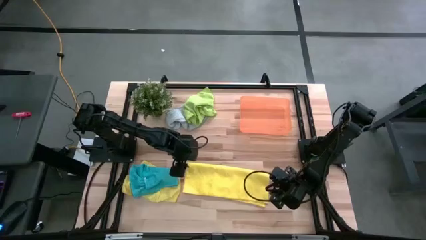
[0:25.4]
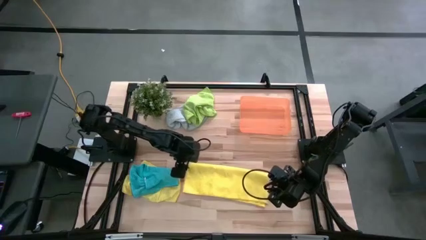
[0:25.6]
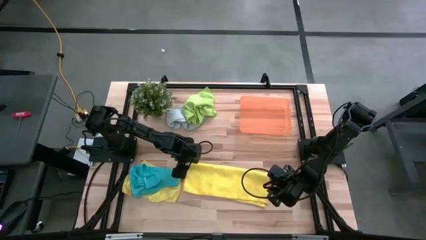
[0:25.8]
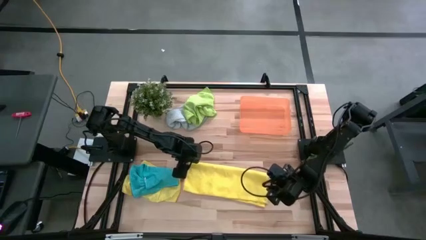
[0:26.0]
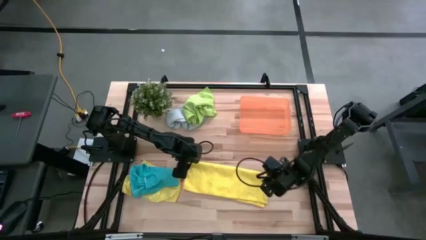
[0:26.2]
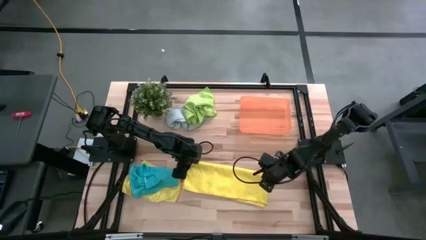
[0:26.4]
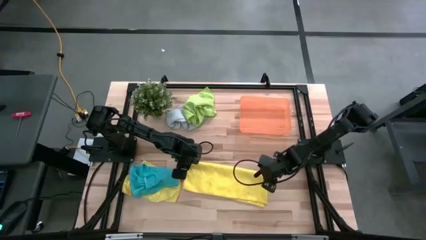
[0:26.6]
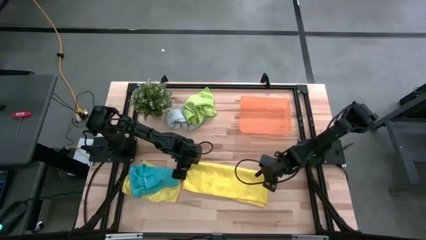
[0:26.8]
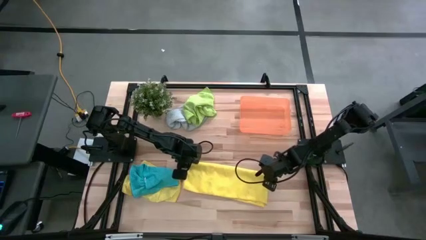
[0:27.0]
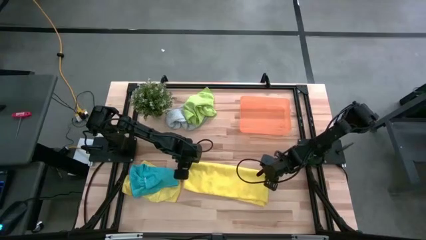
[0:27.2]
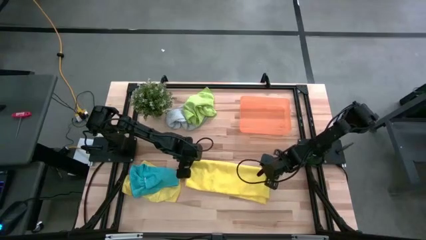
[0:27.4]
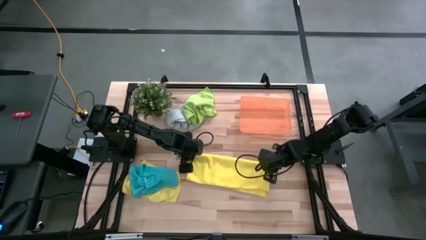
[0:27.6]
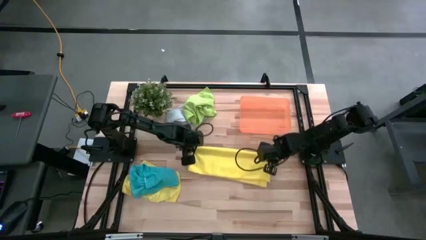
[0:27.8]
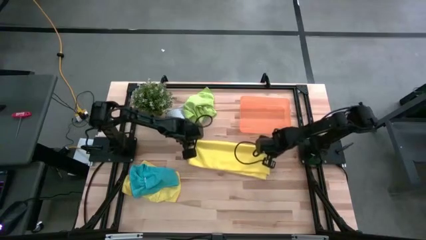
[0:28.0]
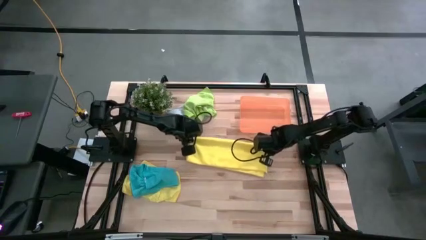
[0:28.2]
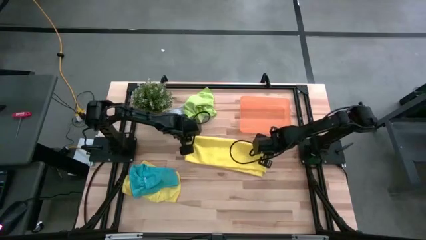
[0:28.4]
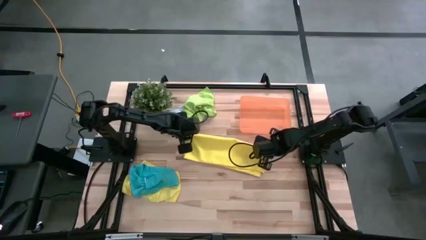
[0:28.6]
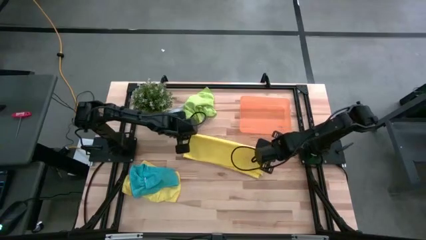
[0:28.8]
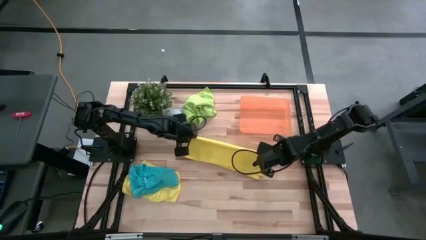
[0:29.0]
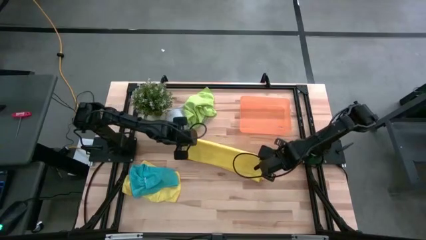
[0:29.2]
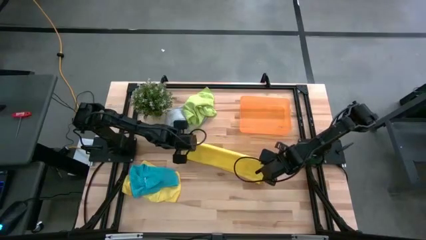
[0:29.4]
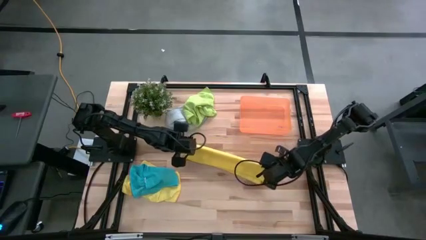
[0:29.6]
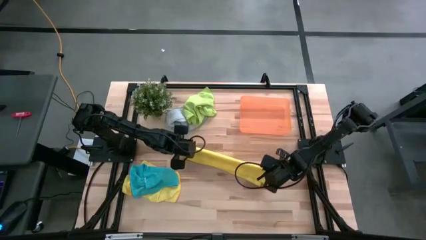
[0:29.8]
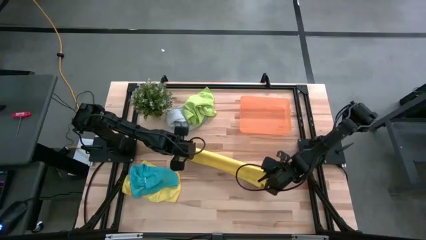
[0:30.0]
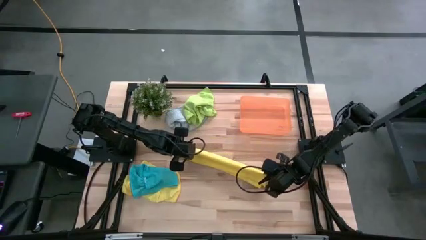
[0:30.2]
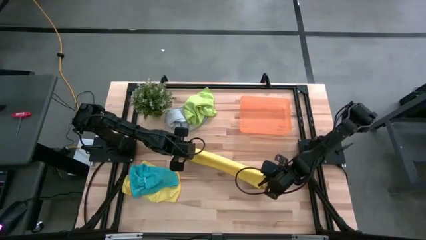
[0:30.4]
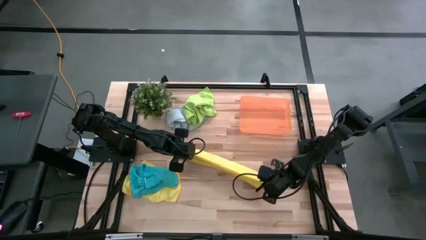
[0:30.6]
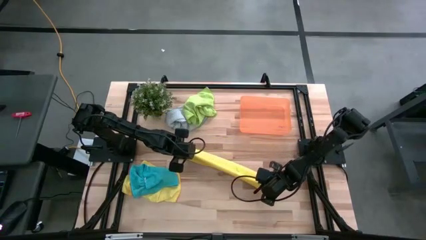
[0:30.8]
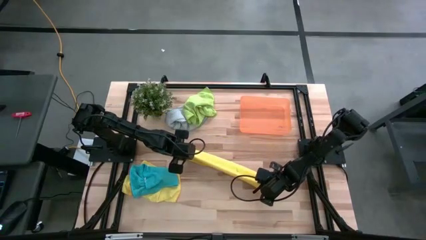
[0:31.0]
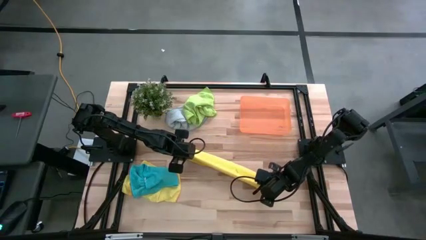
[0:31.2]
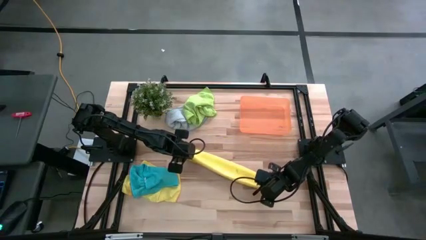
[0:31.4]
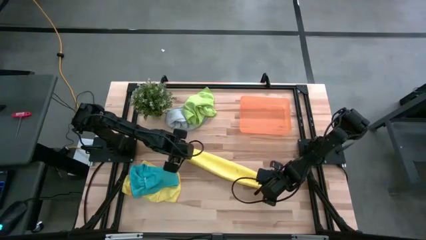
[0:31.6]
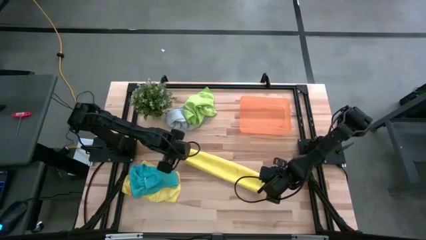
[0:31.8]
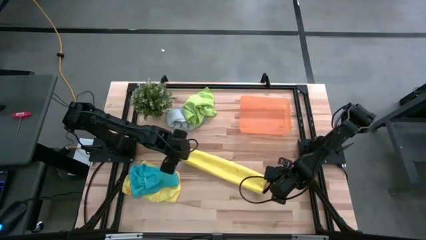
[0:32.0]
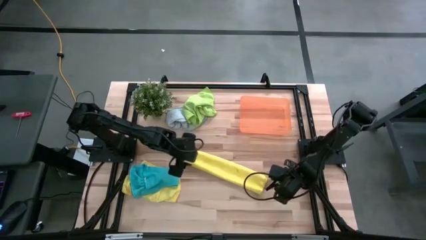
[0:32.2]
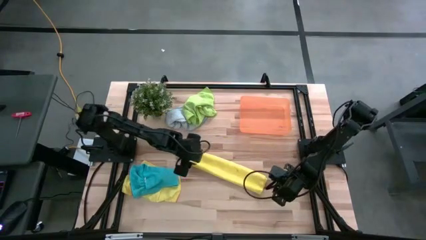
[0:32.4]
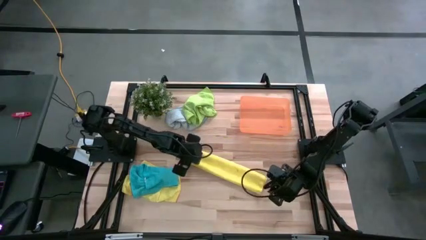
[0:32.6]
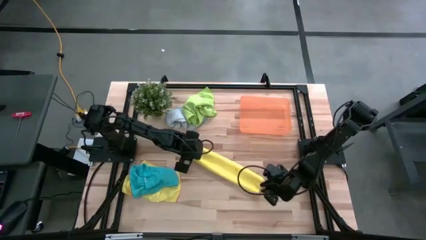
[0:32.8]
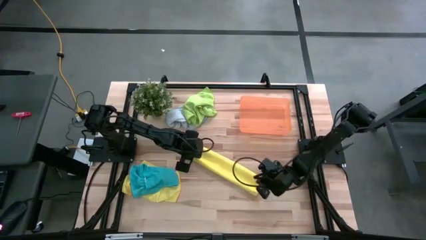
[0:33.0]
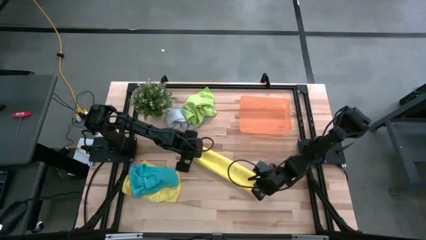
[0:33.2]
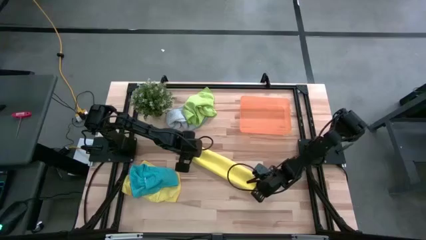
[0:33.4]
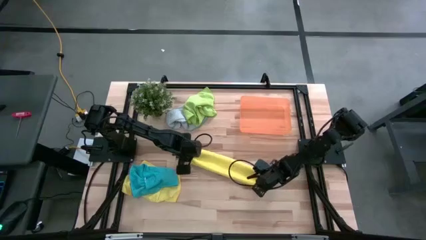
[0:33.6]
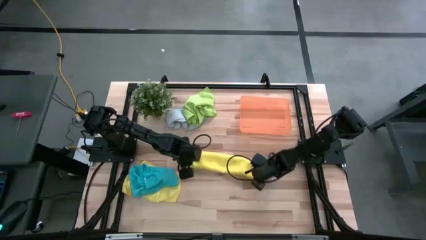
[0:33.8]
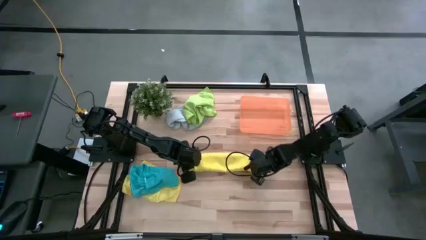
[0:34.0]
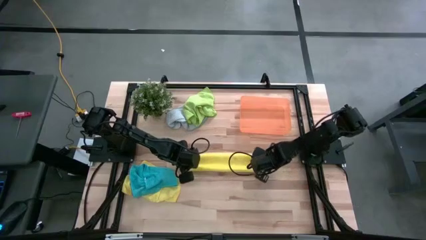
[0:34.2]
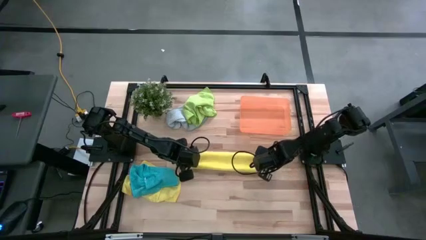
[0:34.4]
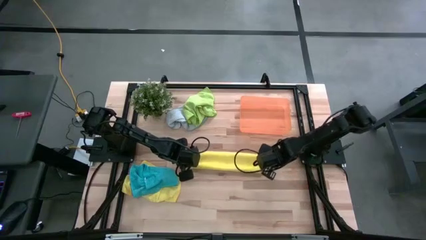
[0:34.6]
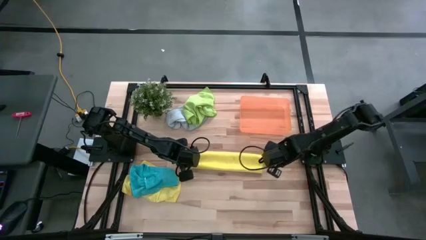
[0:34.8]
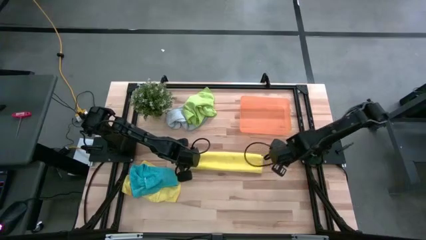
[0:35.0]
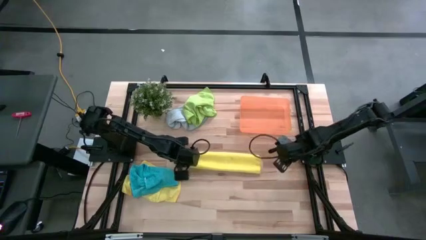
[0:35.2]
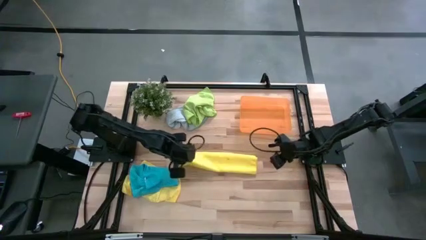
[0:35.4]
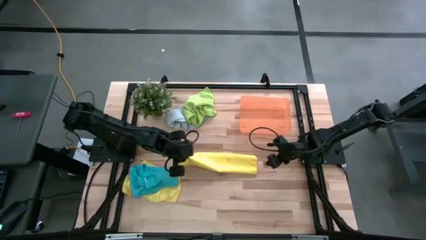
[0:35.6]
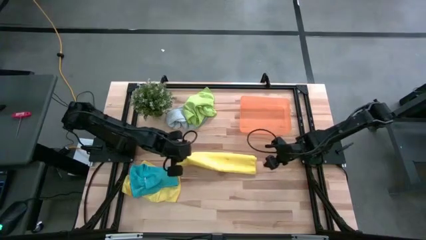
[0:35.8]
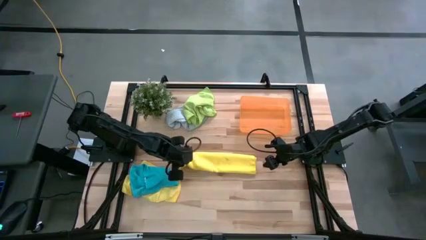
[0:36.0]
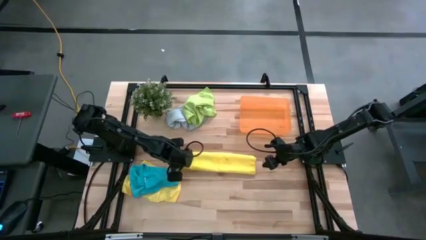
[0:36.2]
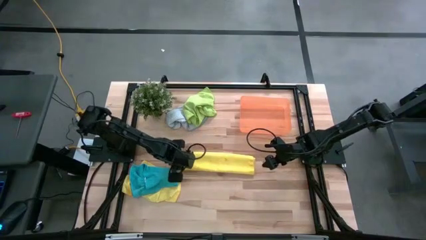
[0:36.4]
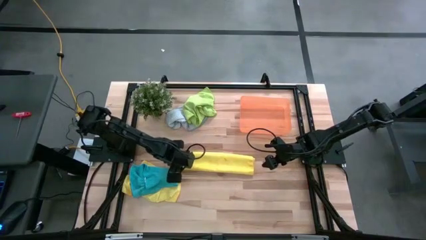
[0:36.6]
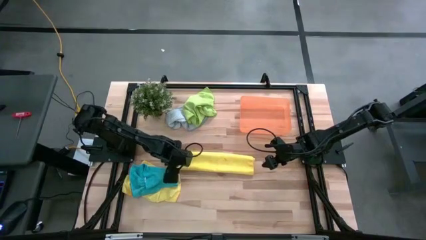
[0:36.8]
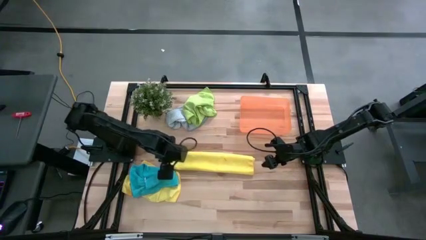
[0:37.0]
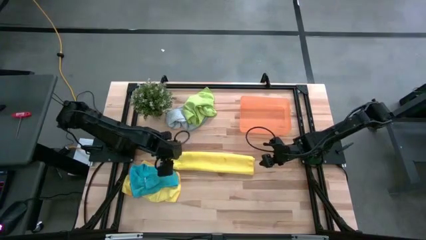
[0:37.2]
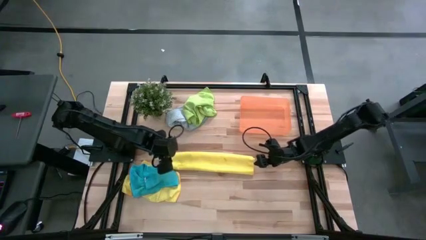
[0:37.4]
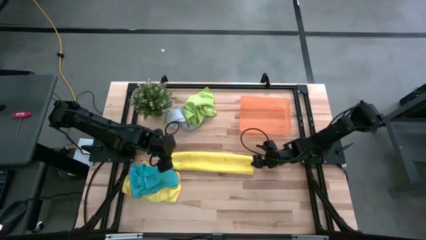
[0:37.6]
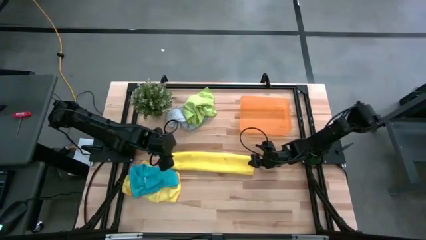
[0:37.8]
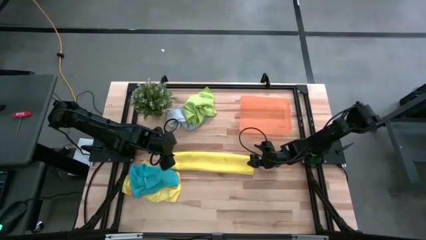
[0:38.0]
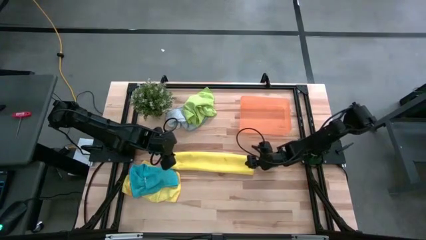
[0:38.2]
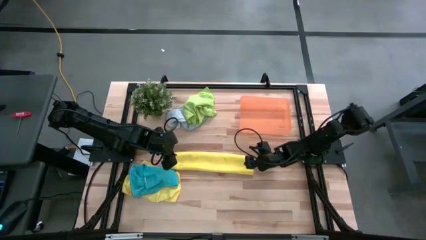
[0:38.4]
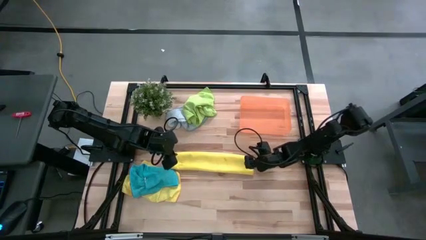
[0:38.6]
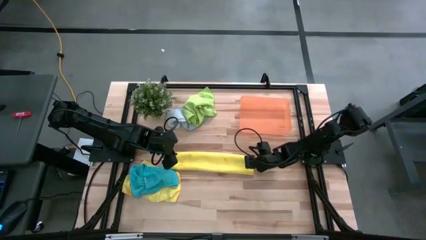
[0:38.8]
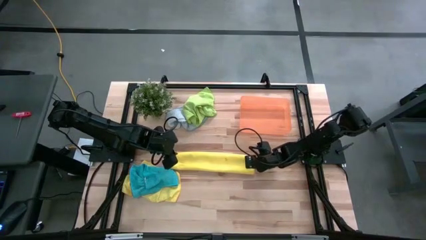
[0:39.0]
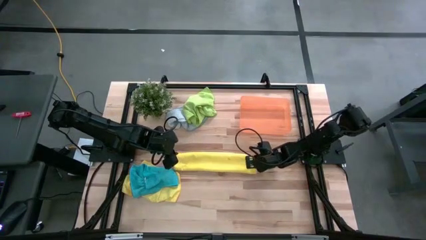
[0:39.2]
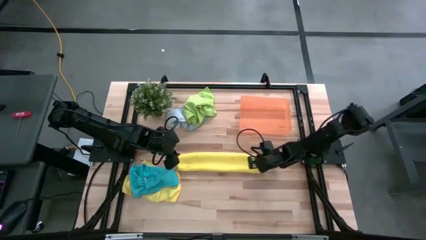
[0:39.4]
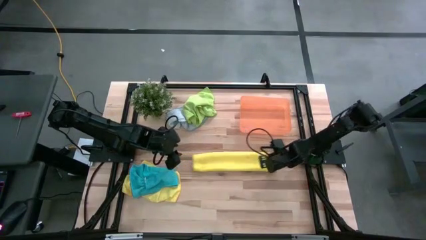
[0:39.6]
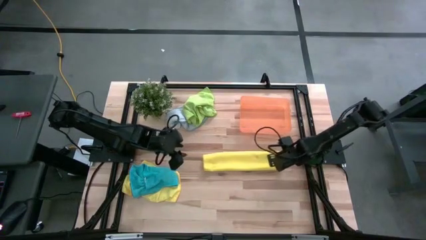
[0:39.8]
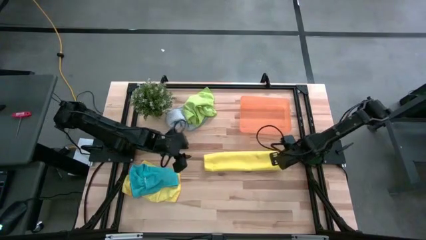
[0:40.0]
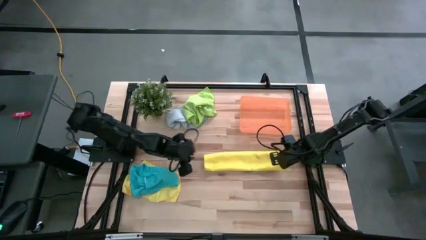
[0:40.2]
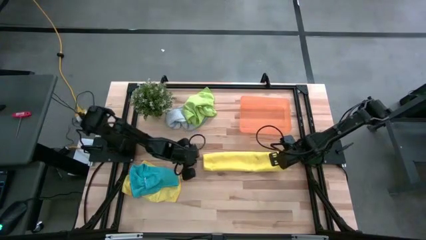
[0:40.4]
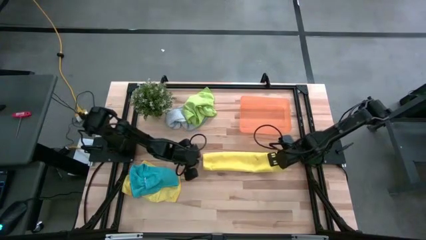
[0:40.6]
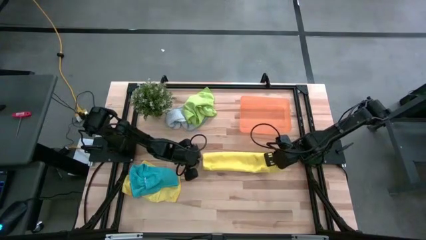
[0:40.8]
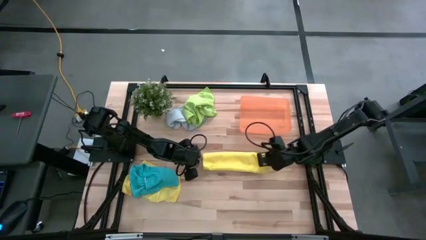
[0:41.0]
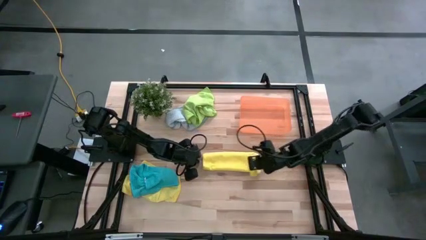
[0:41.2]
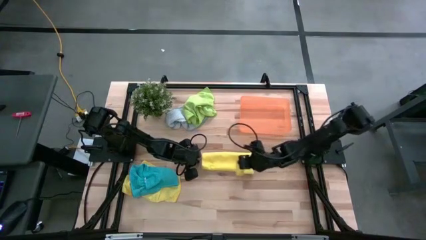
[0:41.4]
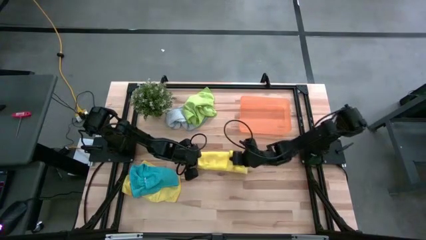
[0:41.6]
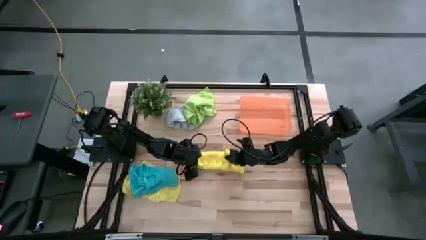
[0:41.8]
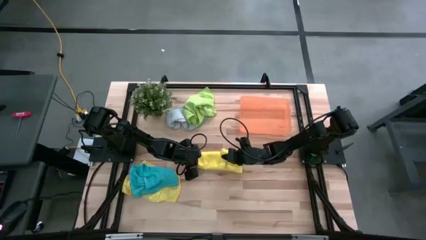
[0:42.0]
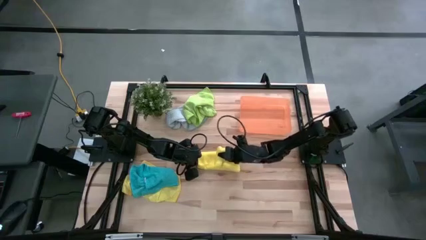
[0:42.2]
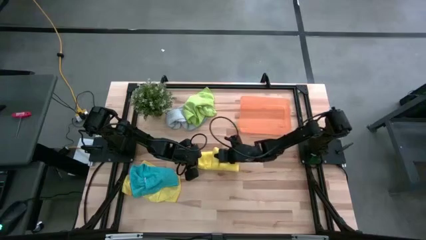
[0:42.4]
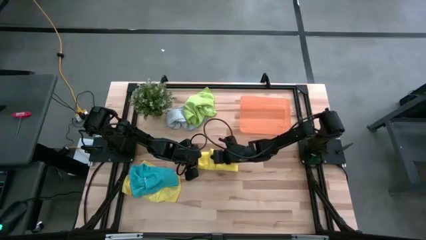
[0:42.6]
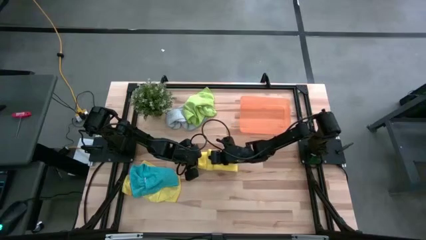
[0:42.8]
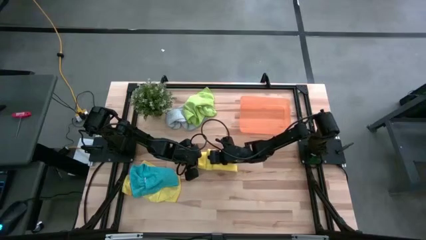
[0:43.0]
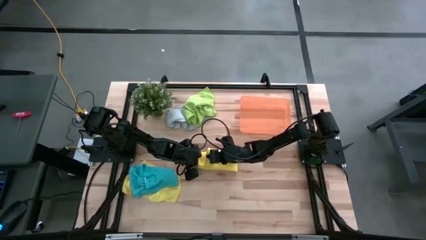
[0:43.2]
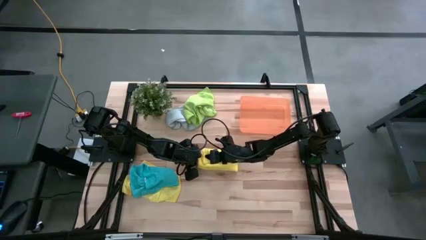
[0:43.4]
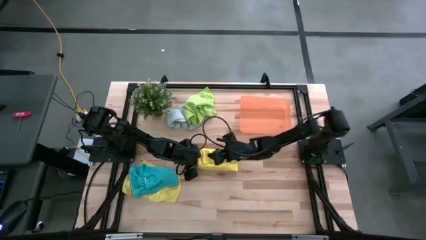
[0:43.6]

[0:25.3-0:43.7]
Task: Fold microfiber towels
Fold the right yellow microfiber cloth
